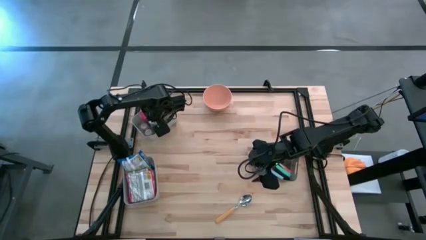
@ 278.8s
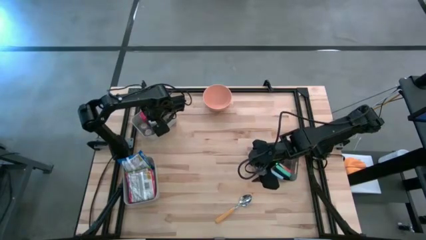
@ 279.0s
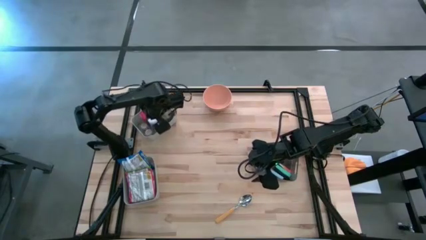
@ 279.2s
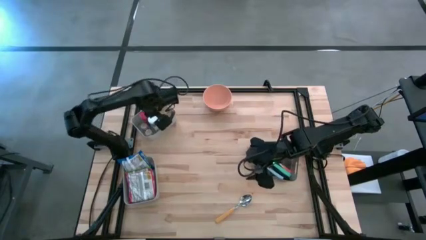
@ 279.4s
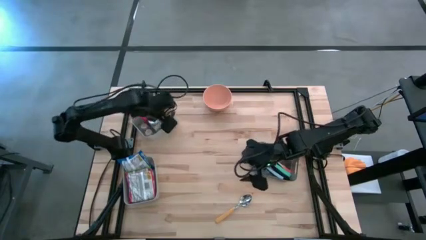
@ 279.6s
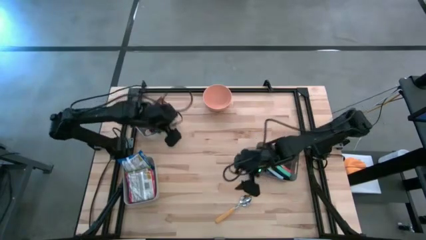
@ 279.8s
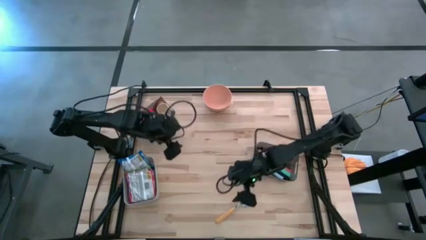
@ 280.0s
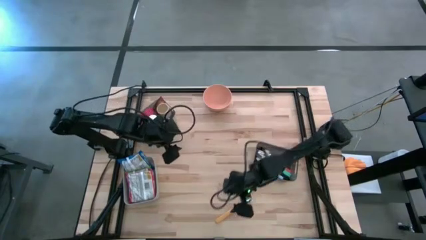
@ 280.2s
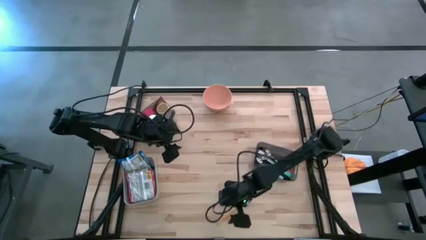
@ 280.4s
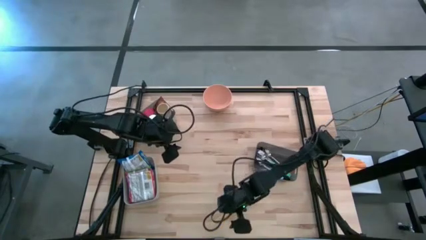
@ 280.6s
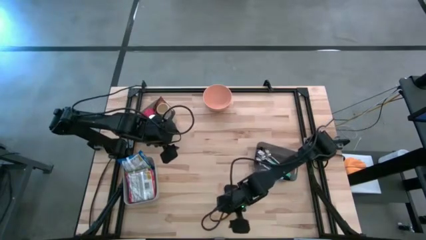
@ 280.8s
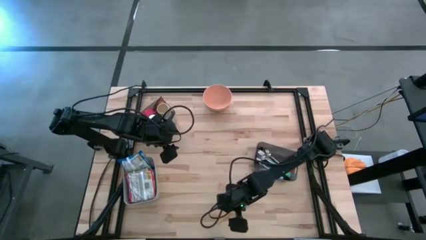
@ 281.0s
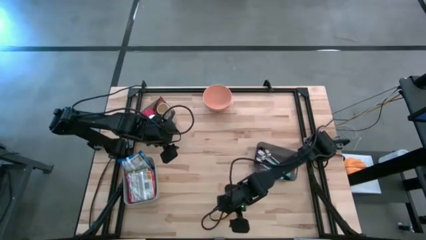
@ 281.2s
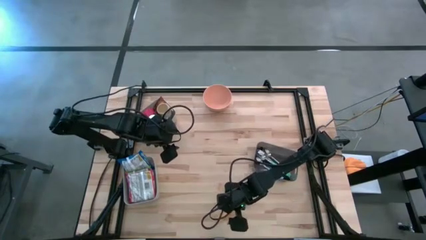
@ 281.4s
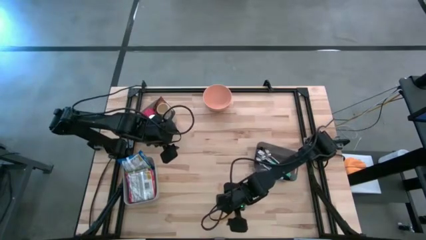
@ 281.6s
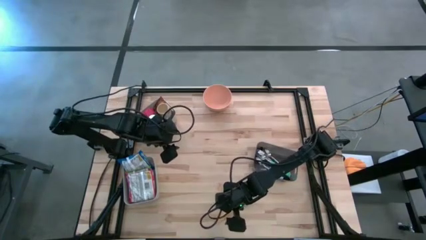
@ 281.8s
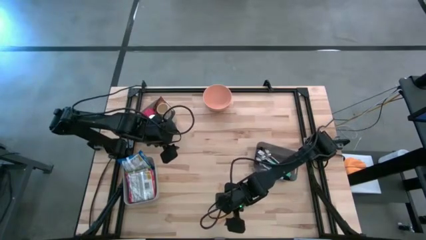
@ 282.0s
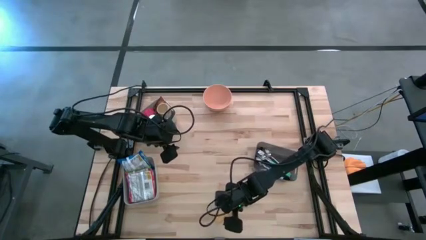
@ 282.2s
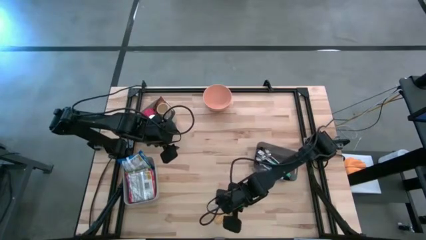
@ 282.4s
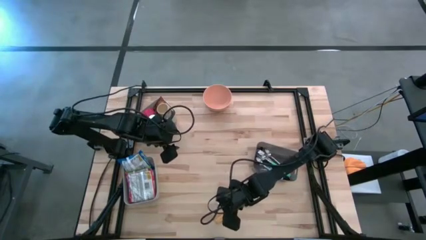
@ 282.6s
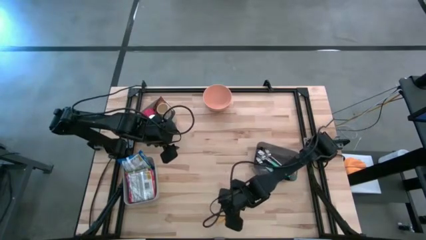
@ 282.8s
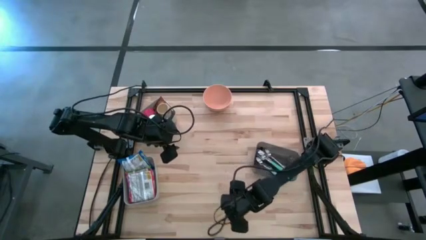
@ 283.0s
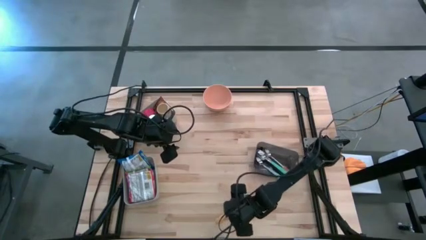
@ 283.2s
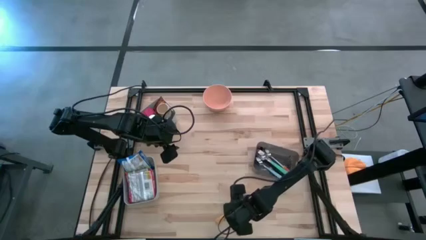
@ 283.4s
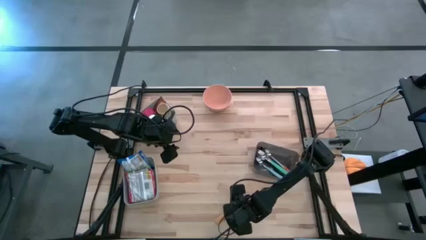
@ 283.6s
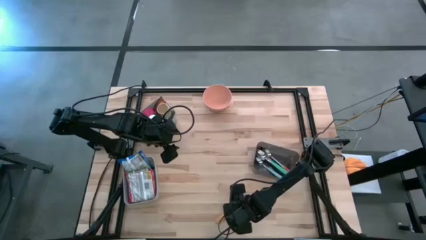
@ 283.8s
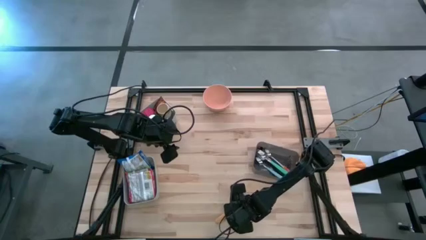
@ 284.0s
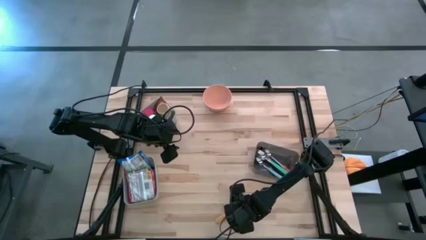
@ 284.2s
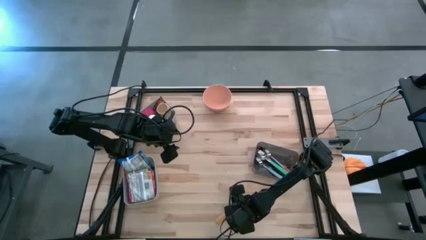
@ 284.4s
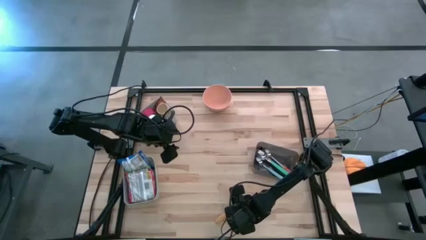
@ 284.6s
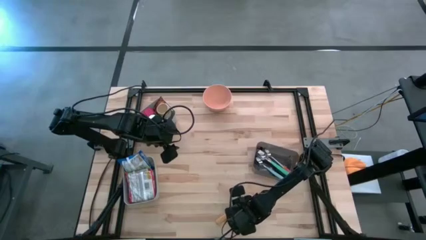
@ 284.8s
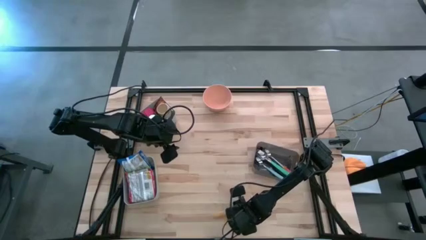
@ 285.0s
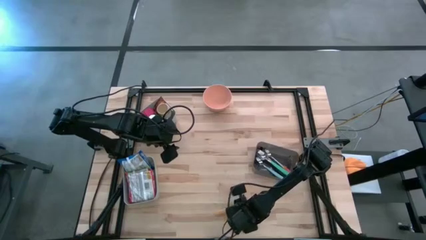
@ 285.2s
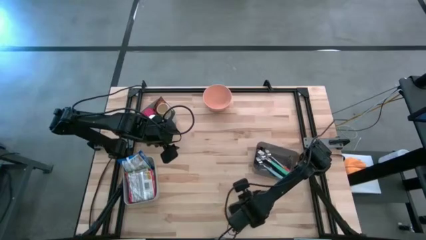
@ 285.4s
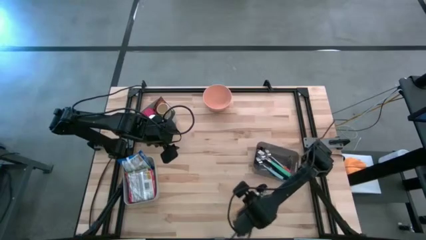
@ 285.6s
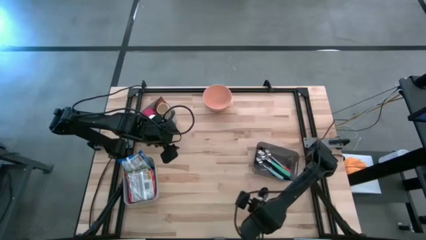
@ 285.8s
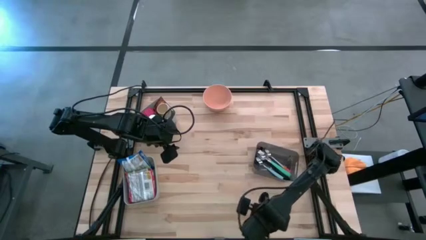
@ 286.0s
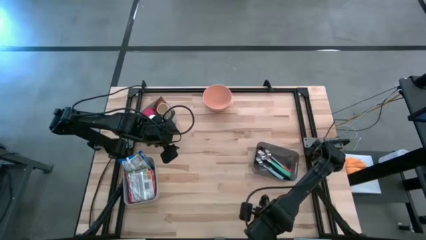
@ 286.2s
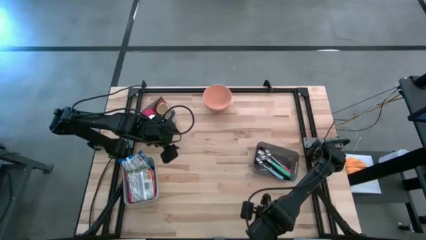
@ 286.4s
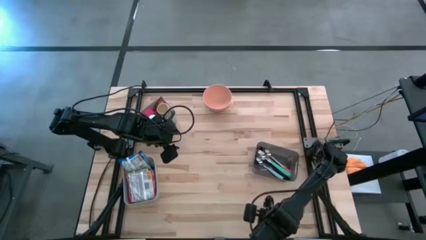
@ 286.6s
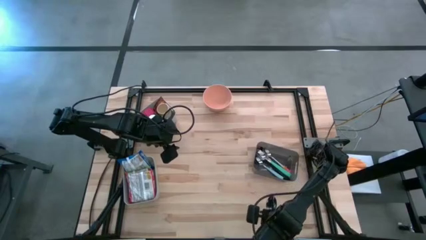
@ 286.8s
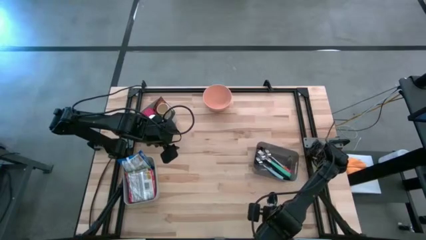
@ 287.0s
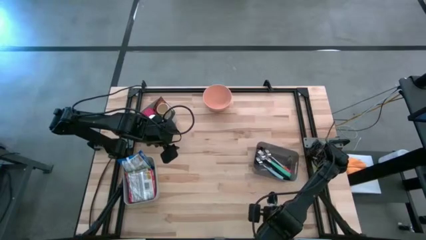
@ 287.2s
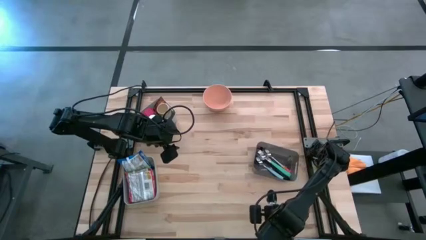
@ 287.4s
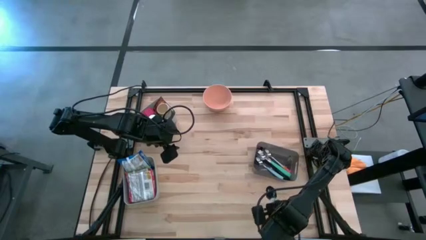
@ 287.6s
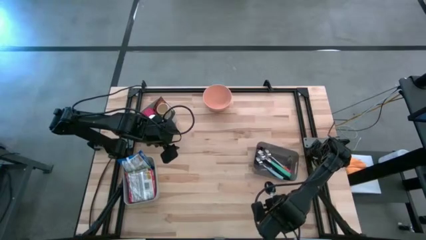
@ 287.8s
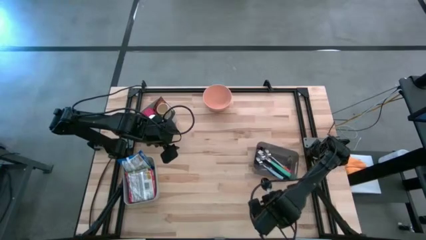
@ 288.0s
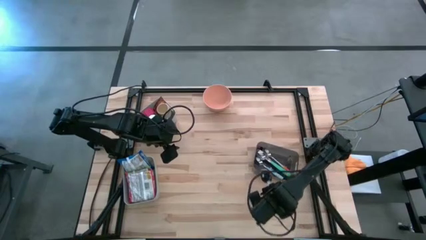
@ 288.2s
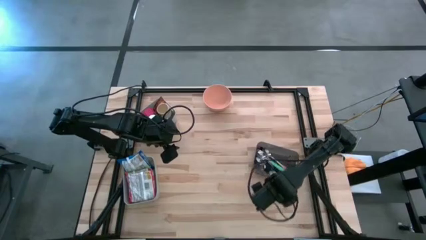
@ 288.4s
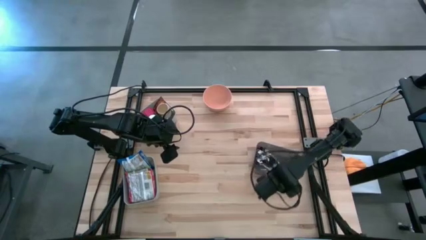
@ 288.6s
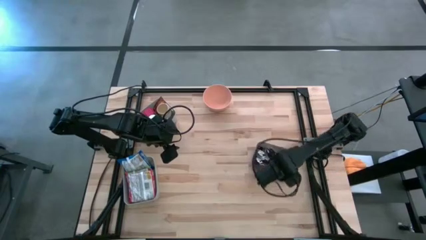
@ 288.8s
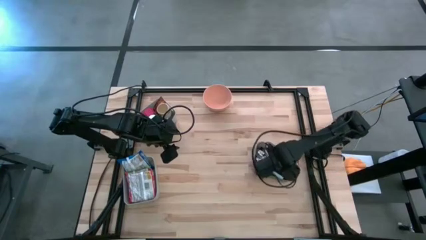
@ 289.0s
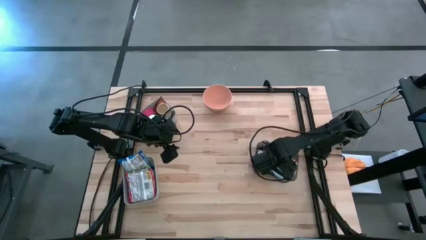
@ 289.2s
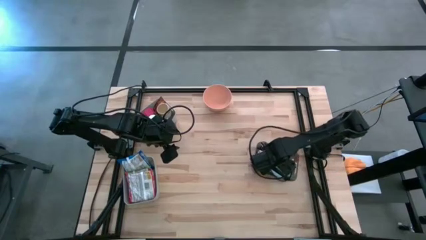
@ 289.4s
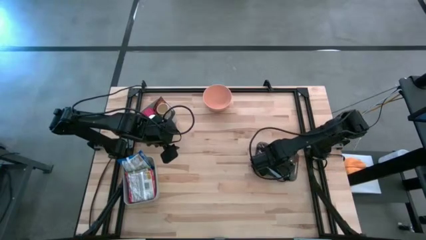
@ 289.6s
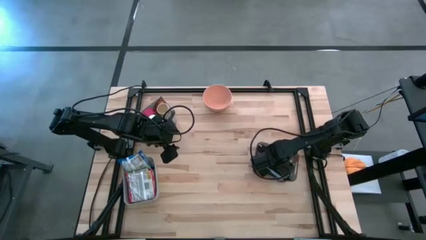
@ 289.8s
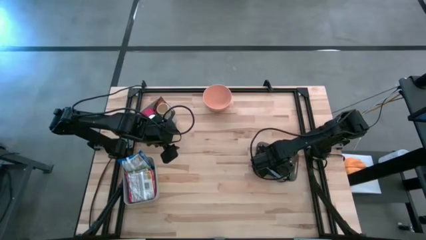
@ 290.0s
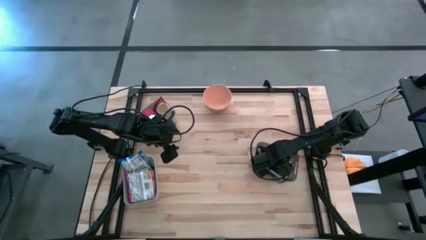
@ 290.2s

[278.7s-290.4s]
Put the yellow spoon into the black bin

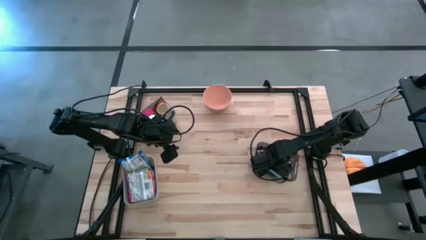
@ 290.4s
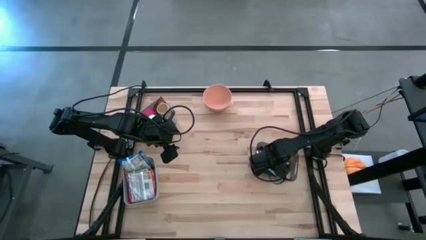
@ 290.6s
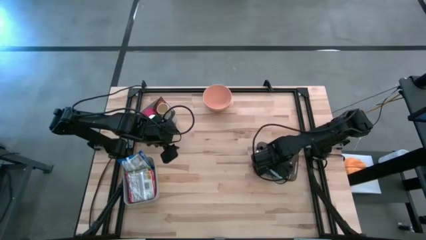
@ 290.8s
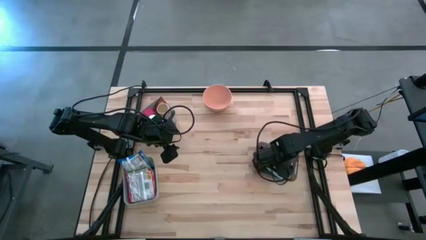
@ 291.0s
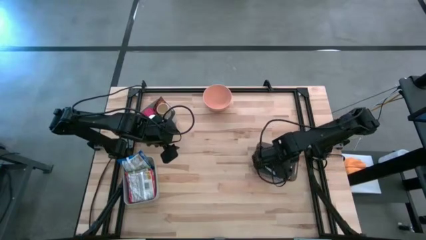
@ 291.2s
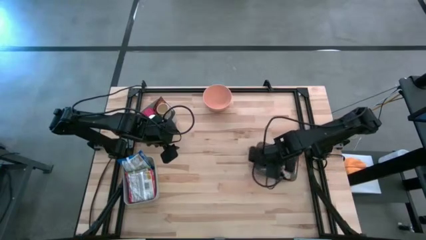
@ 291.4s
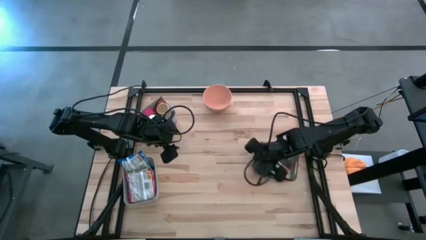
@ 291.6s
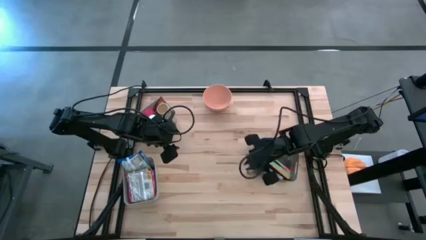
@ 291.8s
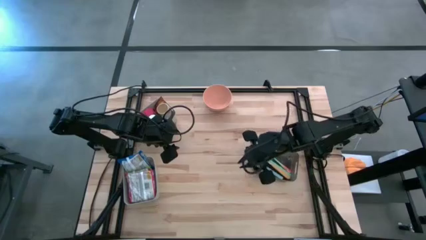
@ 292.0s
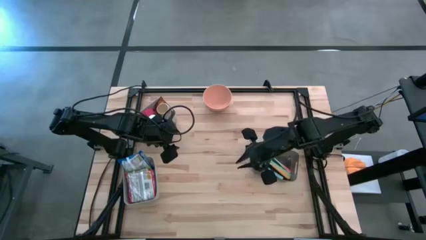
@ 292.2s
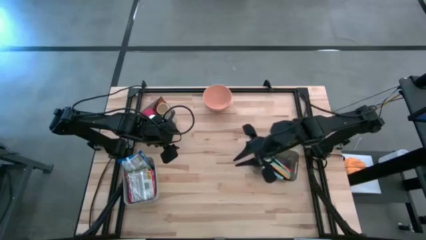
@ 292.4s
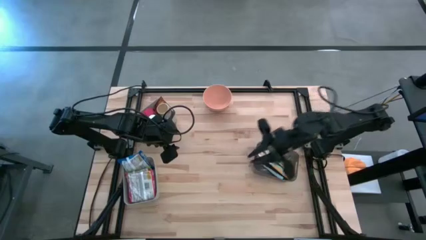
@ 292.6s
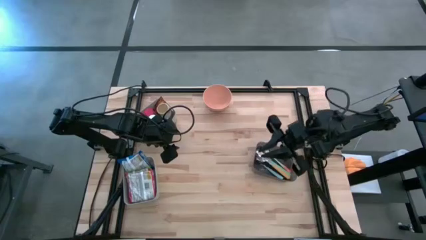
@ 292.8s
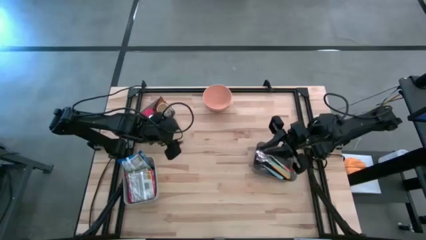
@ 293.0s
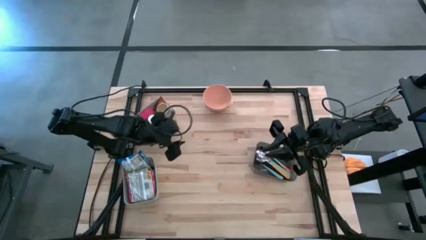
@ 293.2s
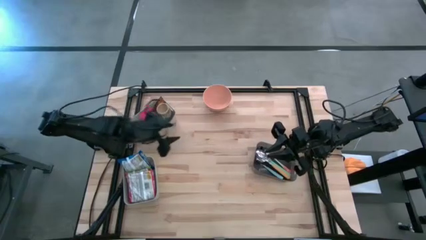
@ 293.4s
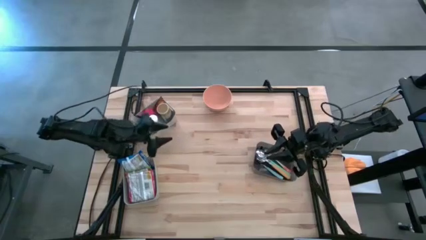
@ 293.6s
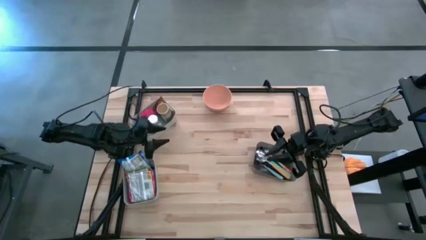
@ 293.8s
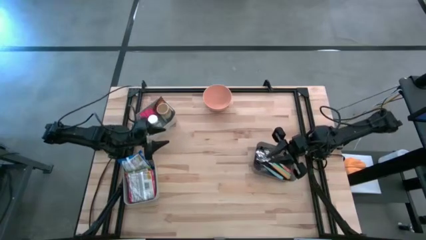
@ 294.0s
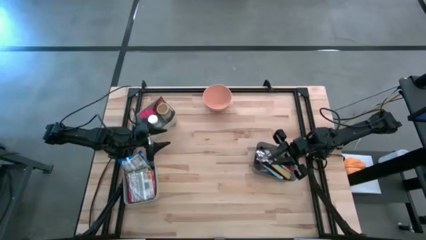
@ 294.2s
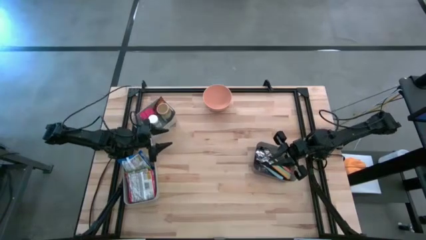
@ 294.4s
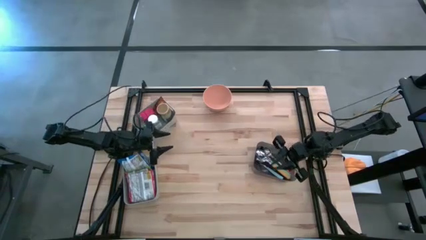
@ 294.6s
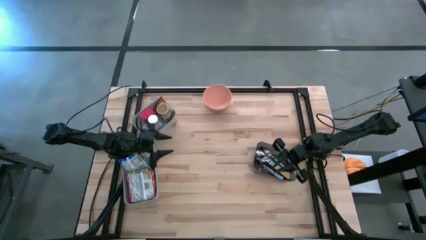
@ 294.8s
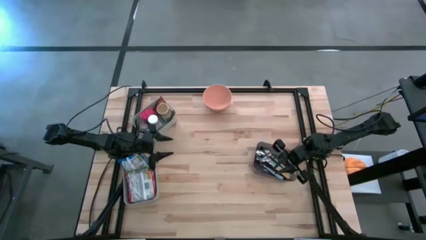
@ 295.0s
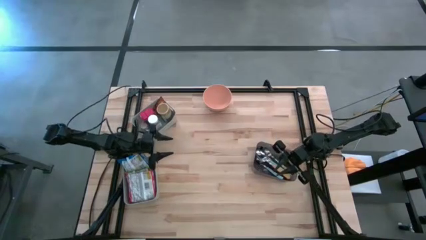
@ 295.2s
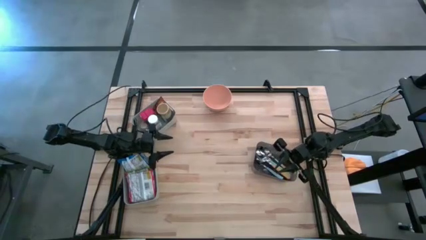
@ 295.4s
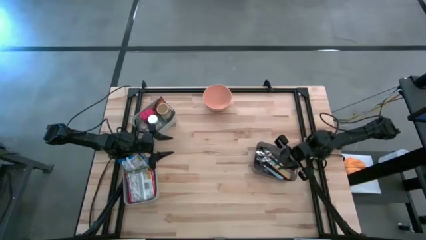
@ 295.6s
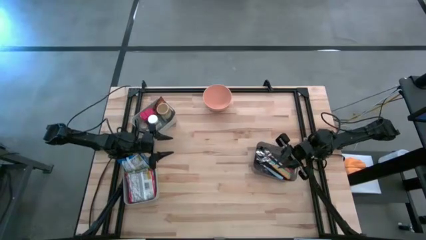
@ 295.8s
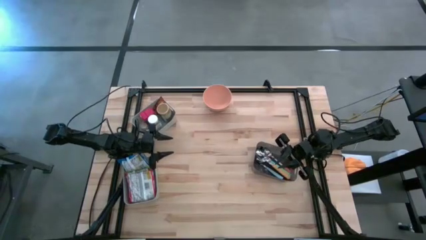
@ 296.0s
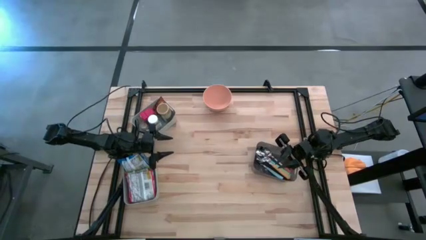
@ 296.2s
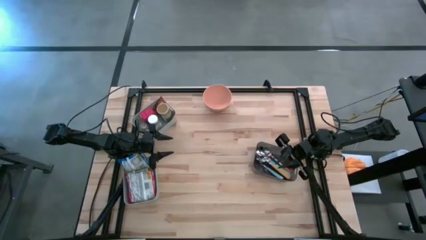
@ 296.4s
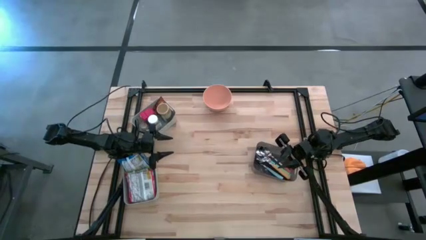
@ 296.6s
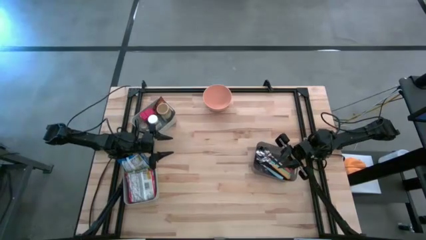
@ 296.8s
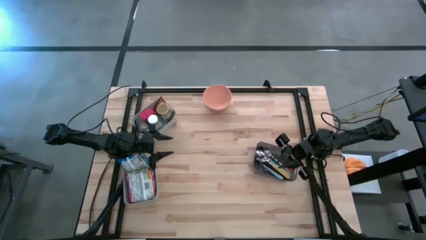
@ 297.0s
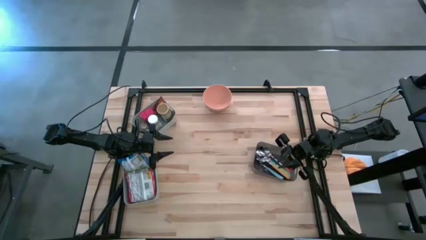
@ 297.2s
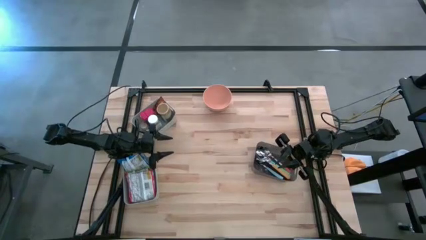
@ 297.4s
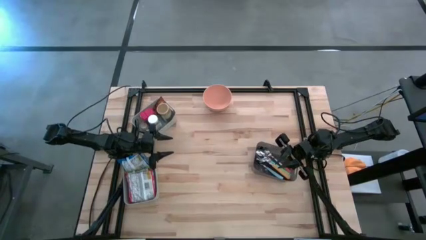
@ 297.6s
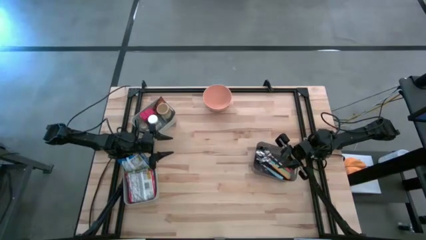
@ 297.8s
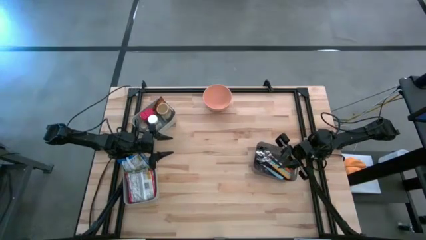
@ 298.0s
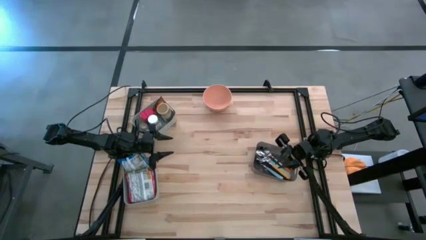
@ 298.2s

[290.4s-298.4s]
Return to Home Position
